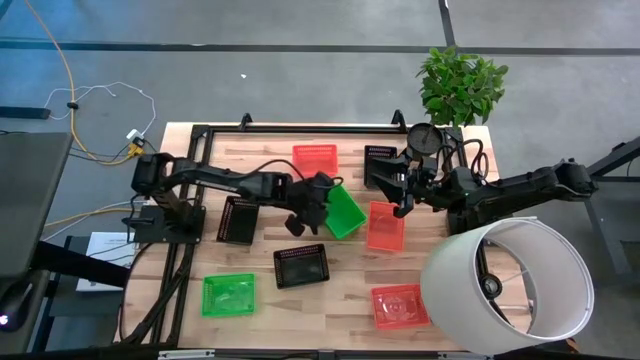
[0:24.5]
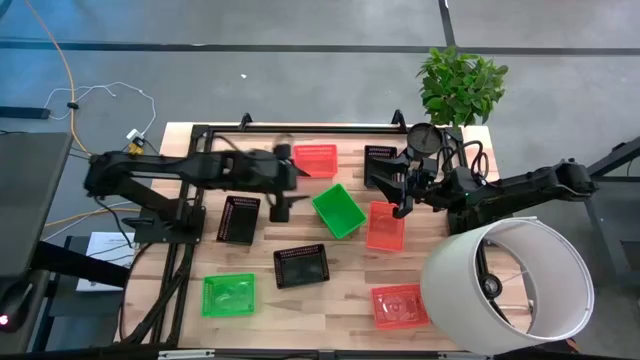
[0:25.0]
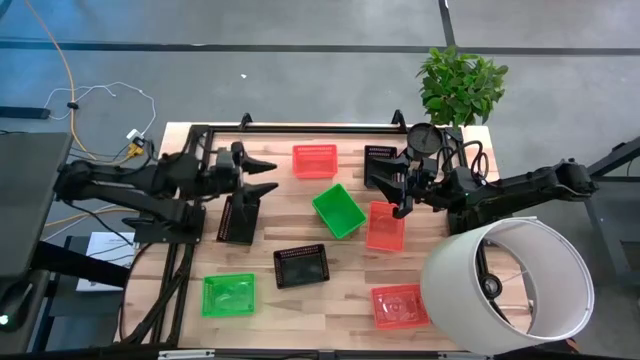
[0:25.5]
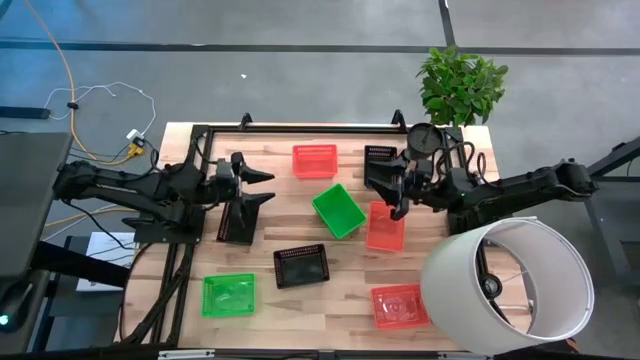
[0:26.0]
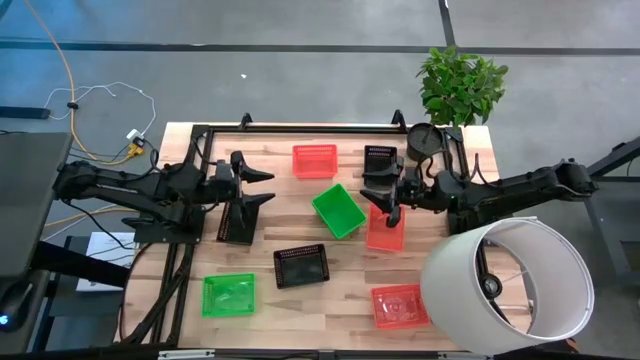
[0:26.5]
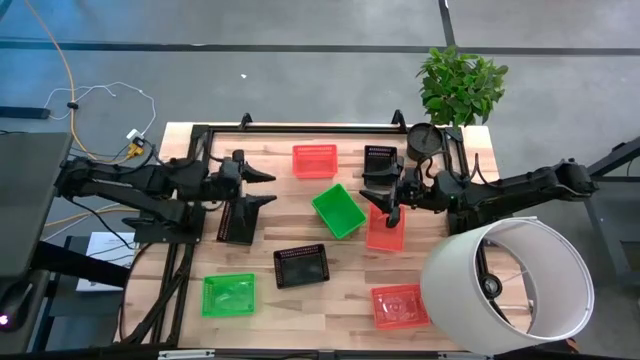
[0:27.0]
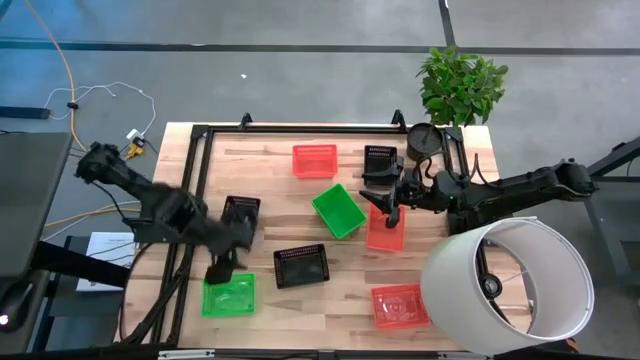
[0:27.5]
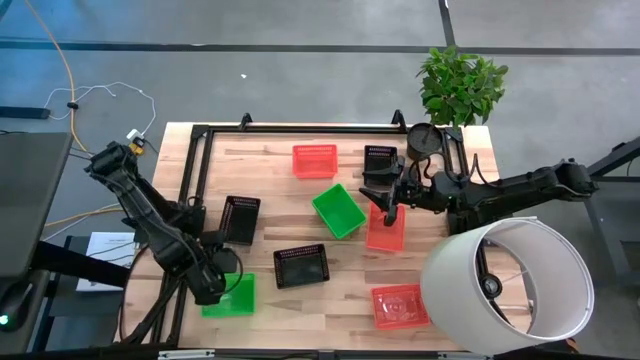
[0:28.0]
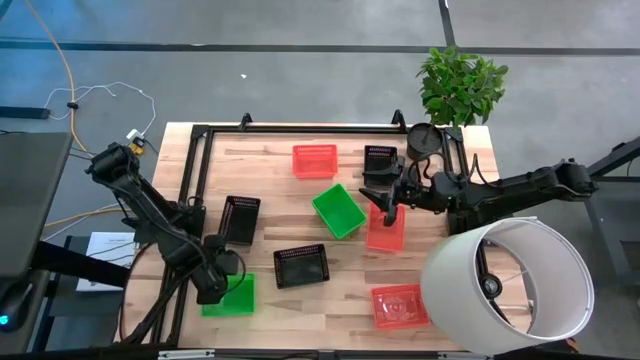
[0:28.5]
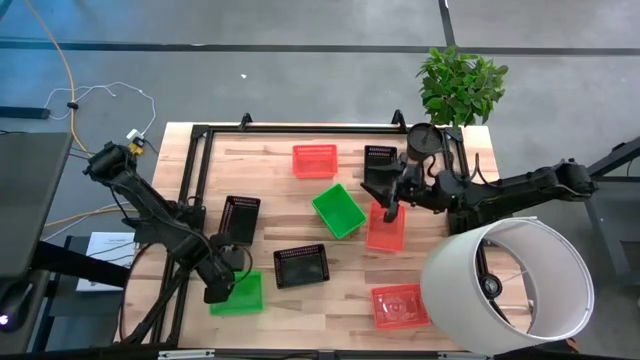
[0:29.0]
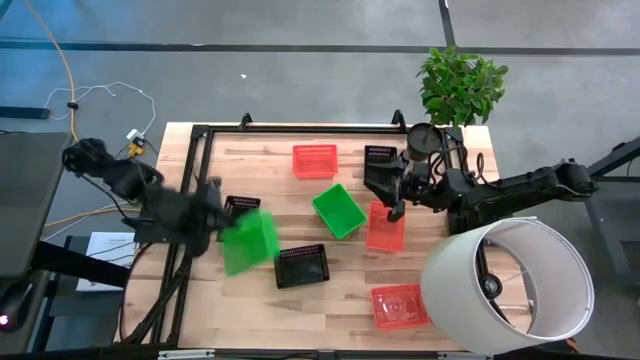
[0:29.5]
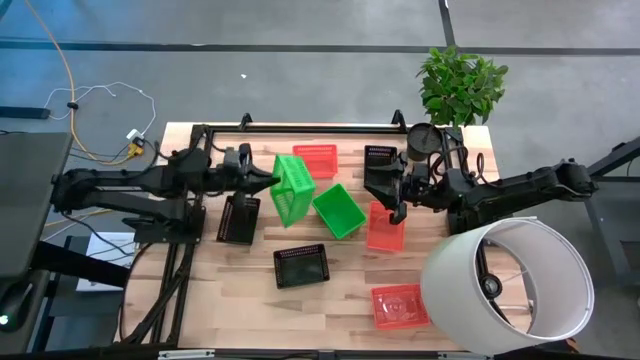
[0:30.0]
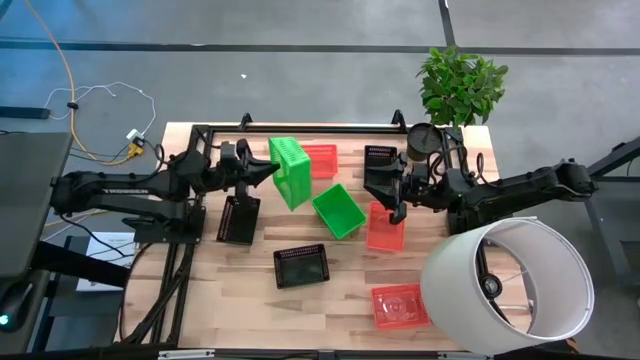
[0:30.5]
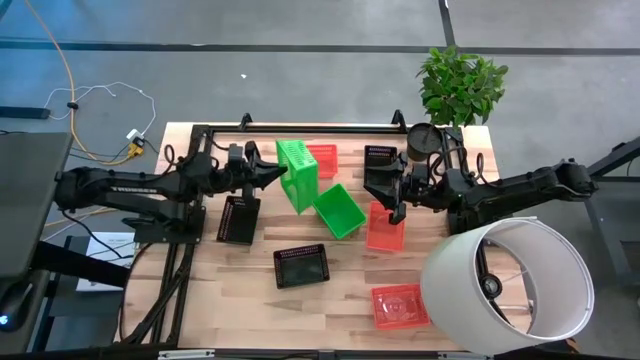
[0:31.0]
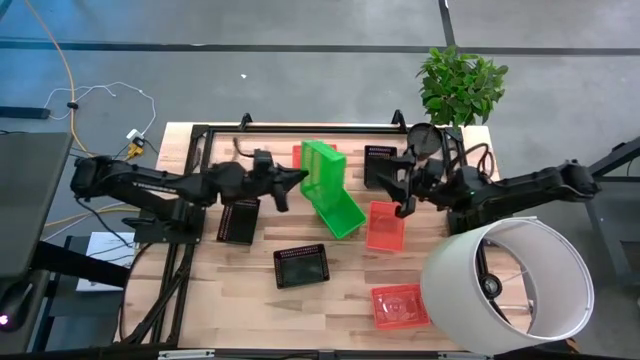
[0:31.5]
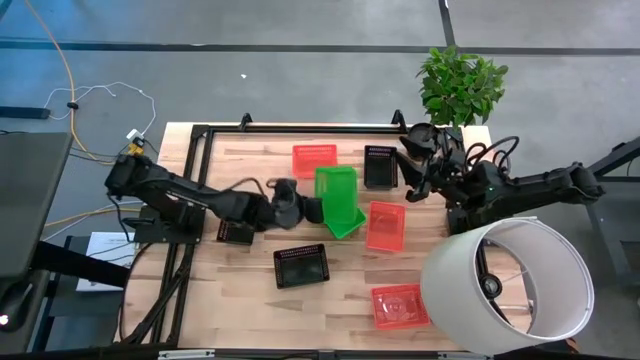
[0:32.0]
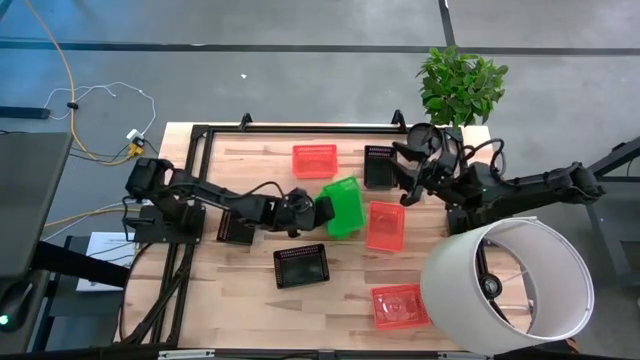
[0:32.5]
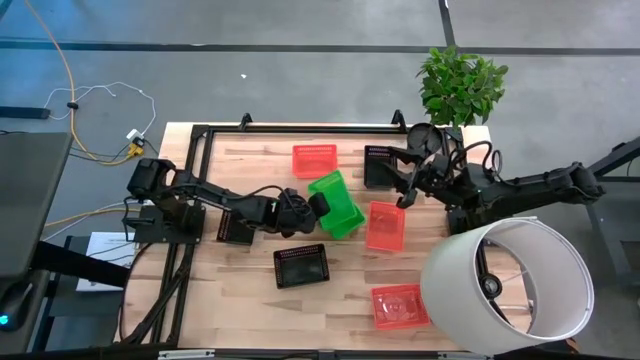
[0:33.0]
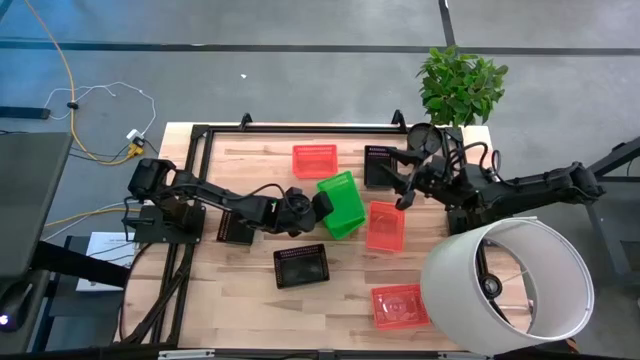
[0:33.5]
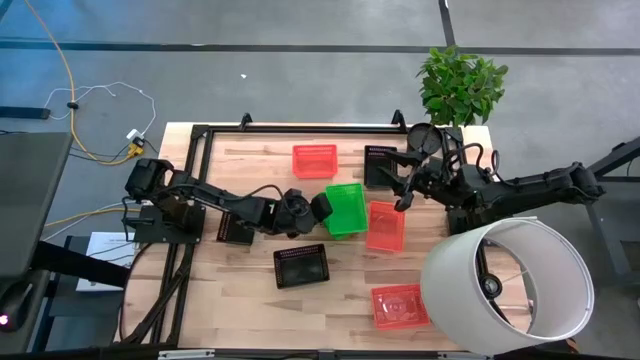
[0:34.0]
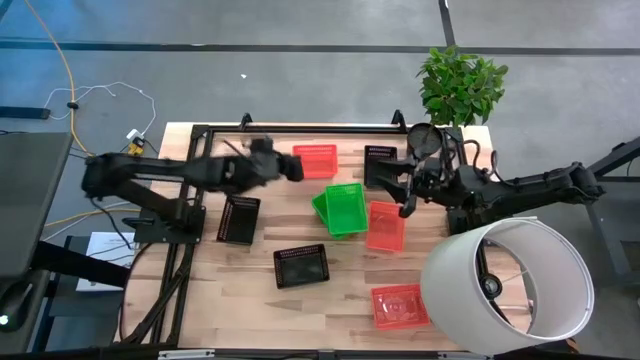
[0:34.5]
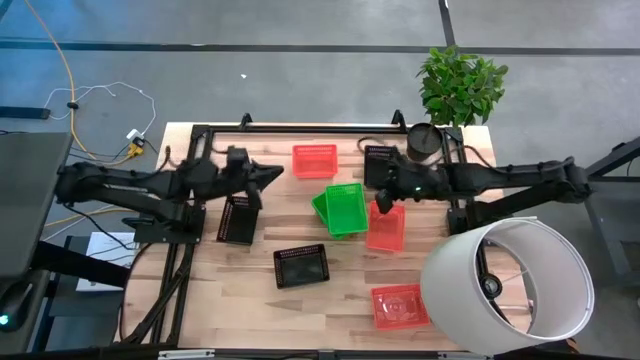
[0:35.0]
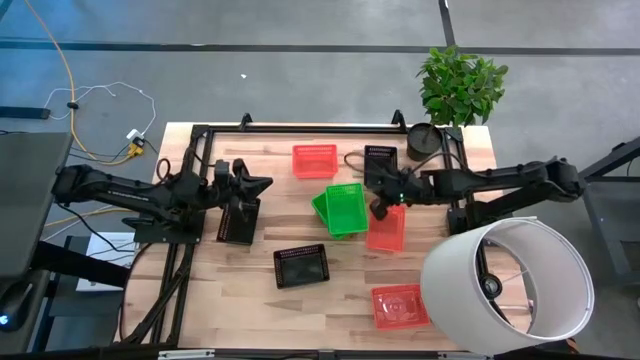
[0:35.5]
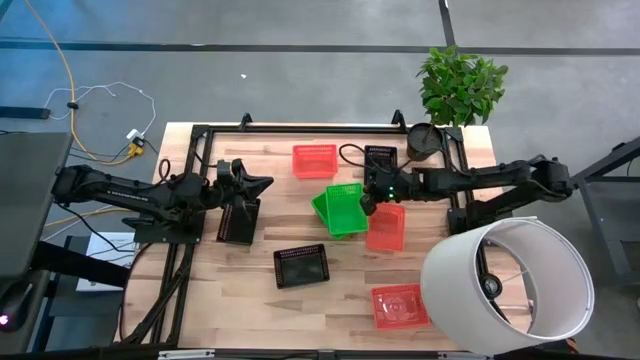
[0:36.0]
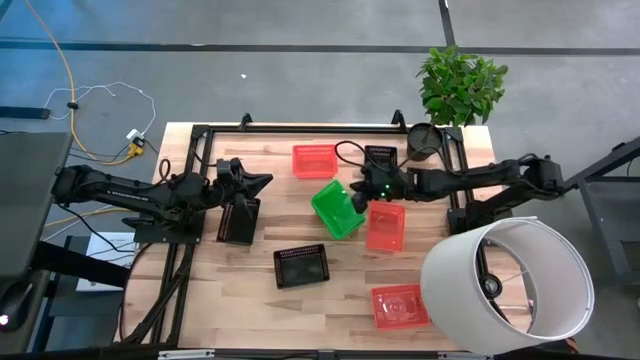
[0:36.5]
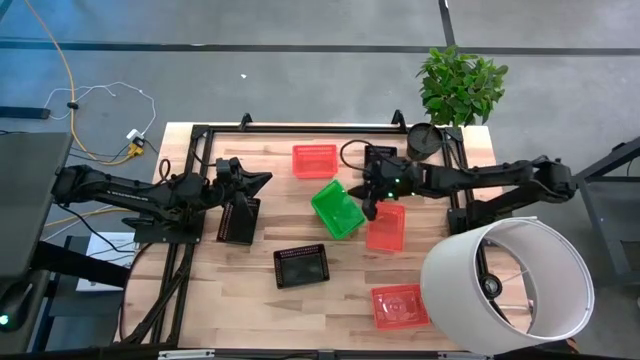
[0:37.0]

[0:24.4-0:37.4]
Stack the green basket on the green basket
